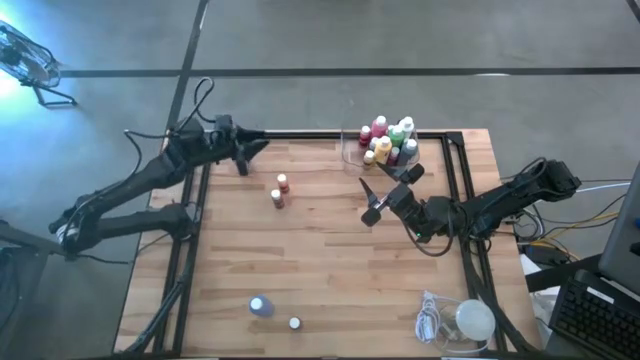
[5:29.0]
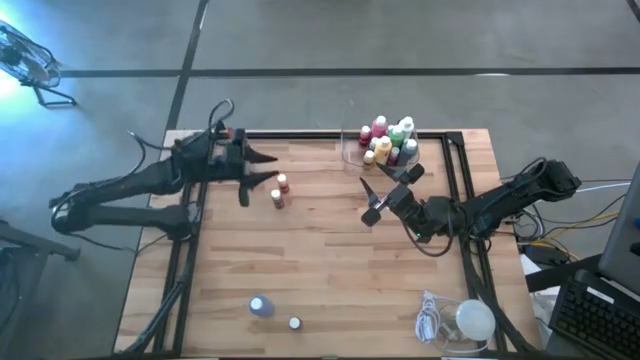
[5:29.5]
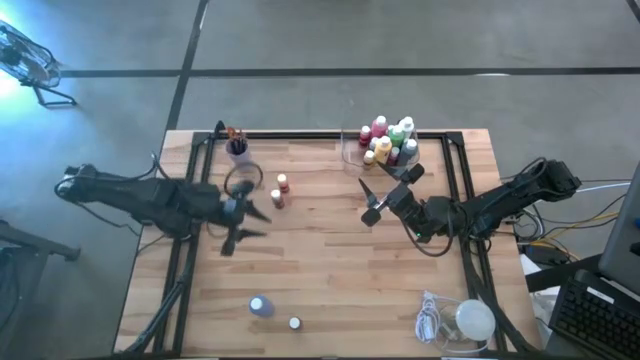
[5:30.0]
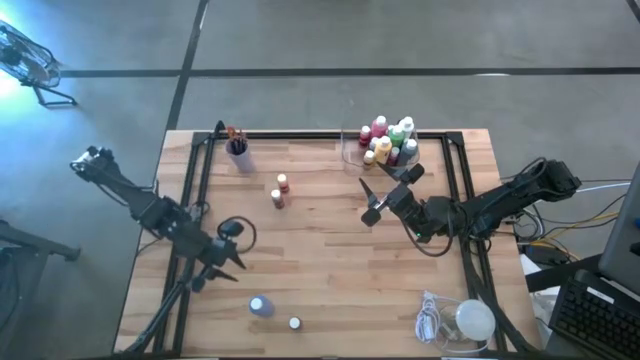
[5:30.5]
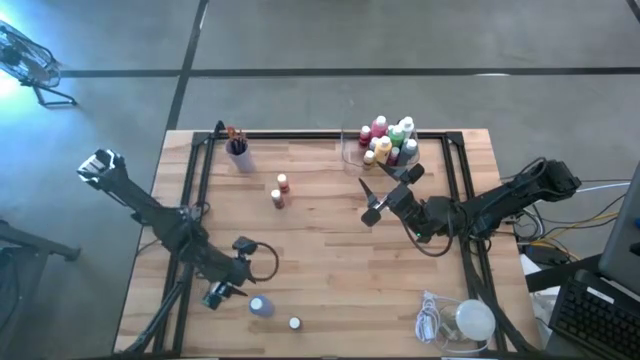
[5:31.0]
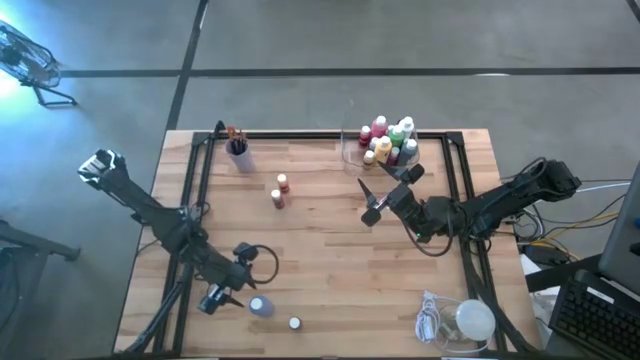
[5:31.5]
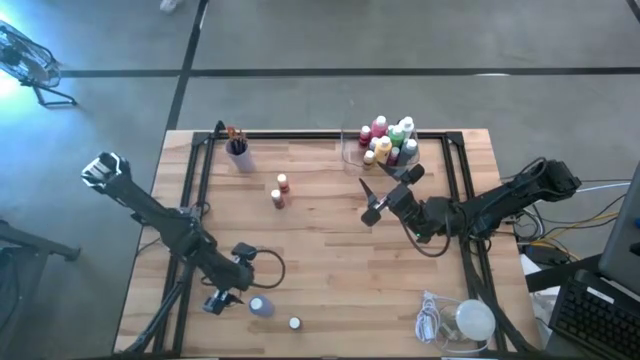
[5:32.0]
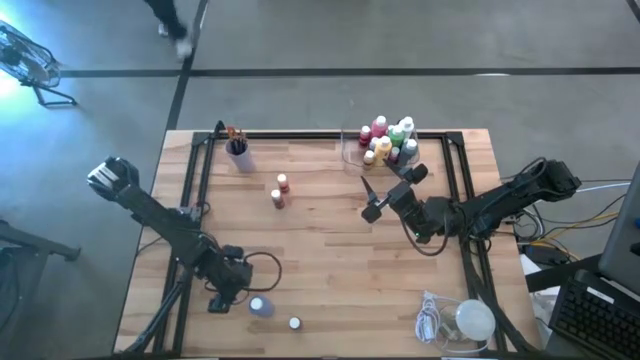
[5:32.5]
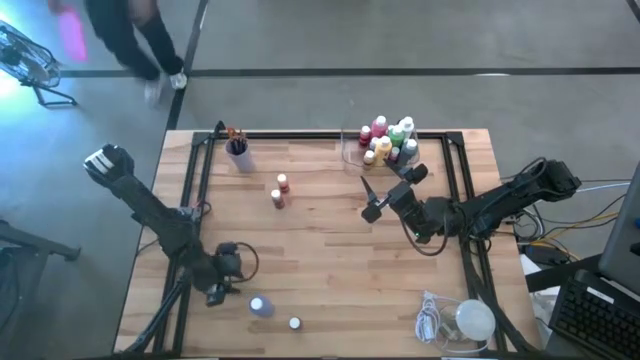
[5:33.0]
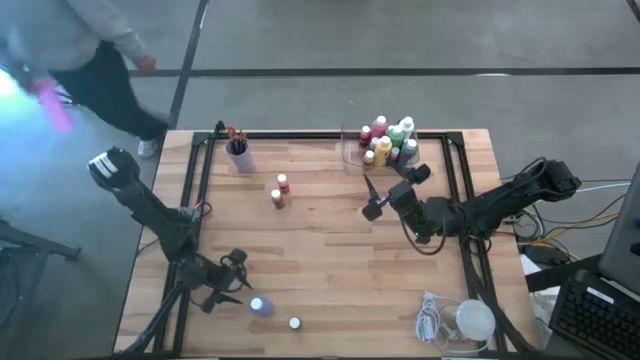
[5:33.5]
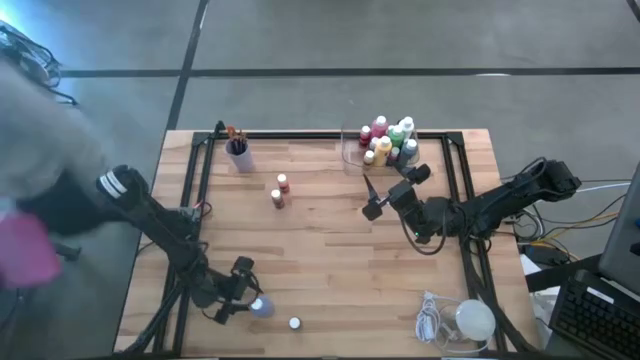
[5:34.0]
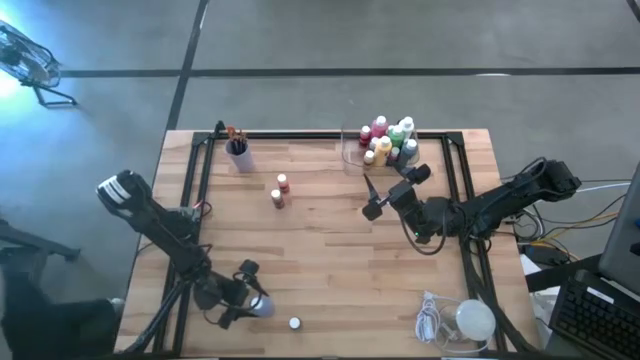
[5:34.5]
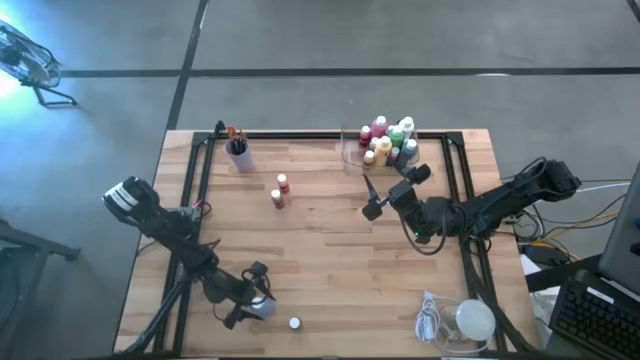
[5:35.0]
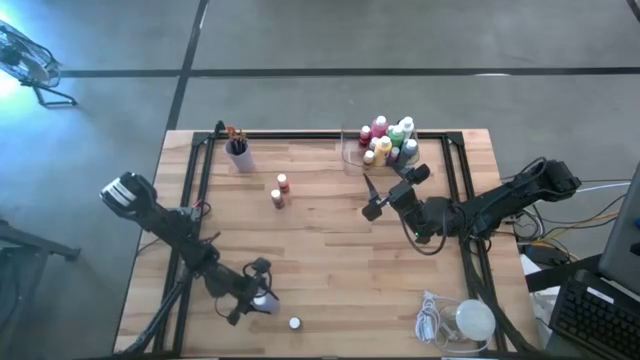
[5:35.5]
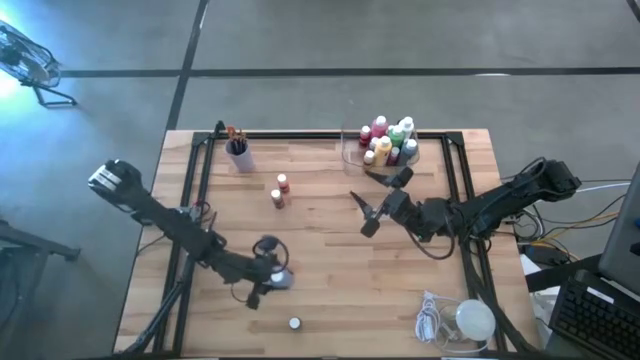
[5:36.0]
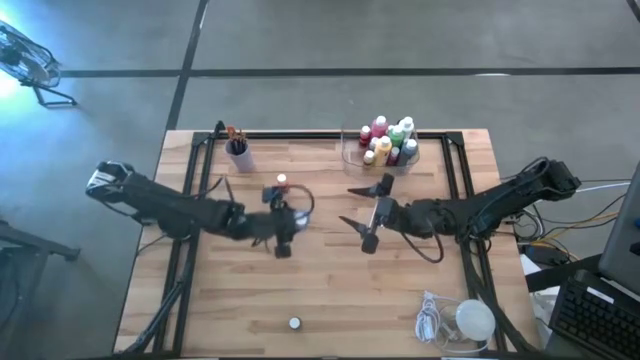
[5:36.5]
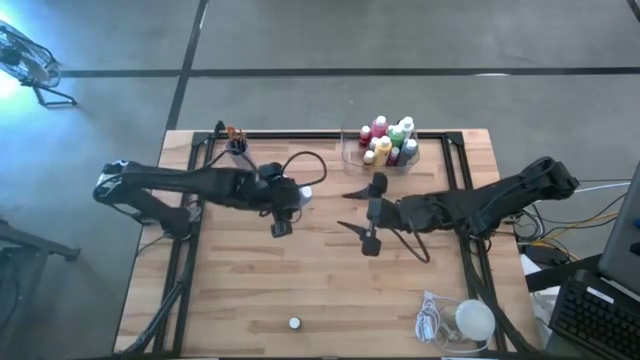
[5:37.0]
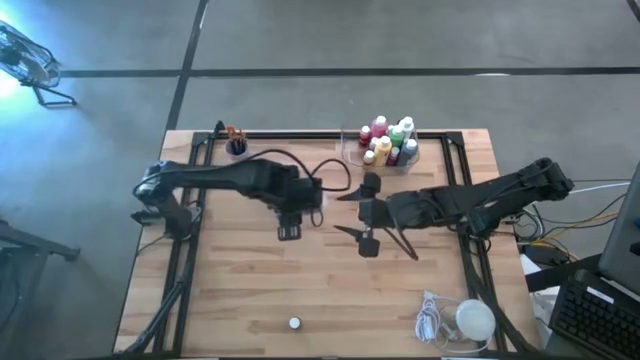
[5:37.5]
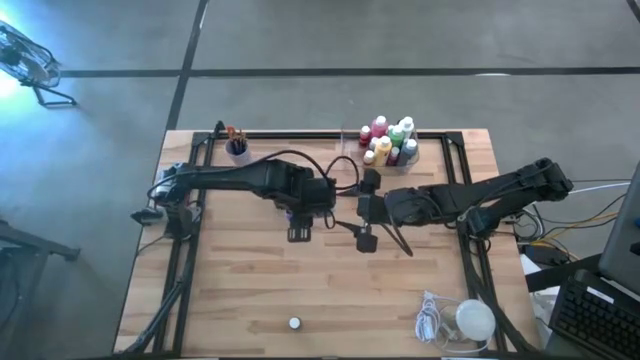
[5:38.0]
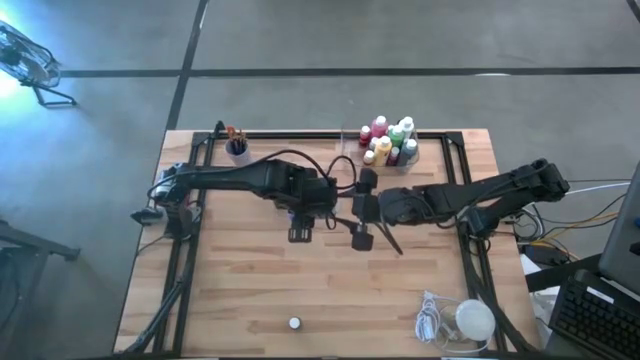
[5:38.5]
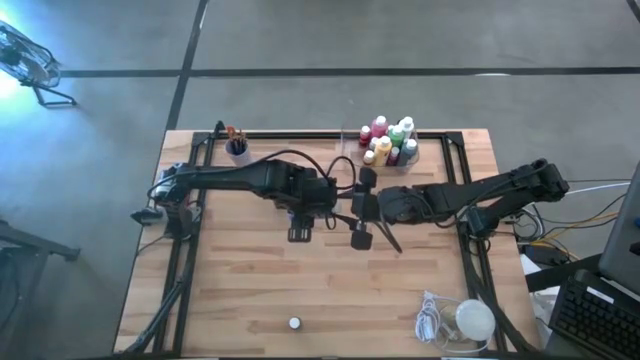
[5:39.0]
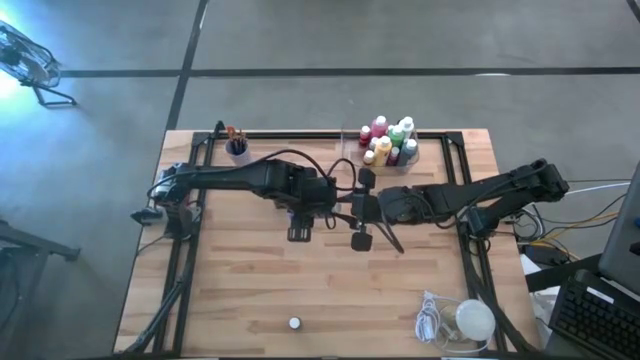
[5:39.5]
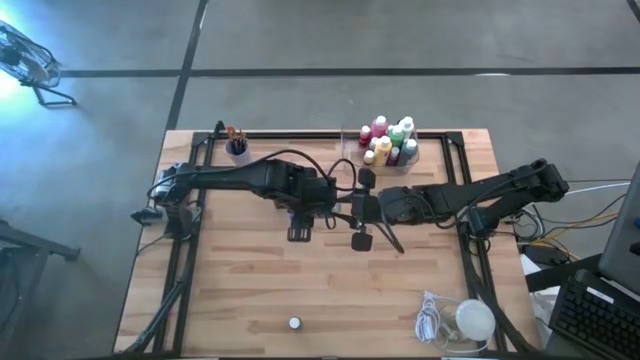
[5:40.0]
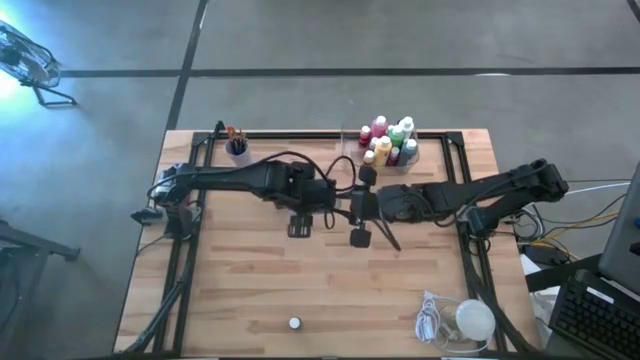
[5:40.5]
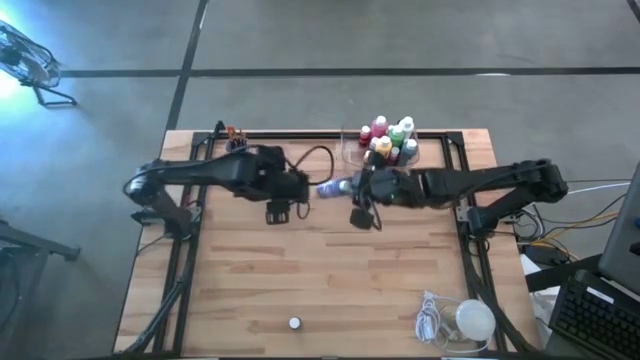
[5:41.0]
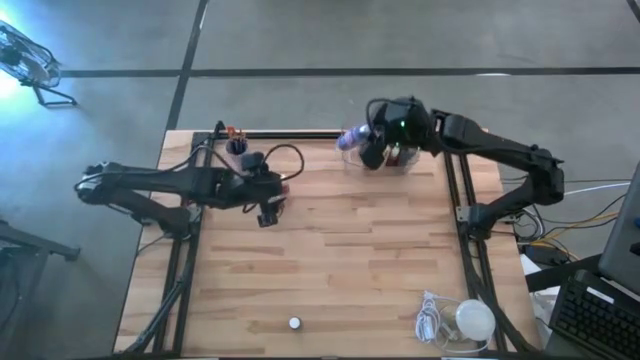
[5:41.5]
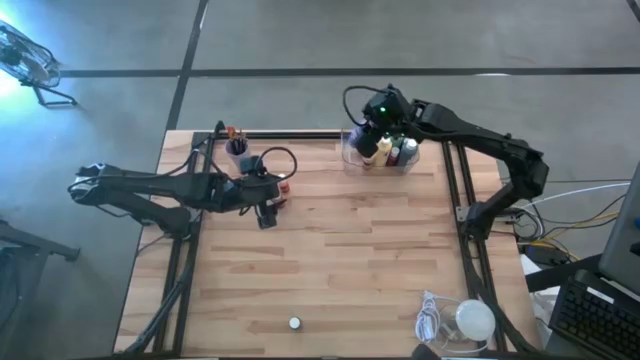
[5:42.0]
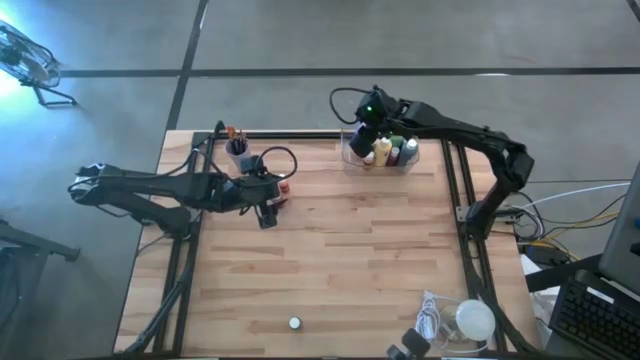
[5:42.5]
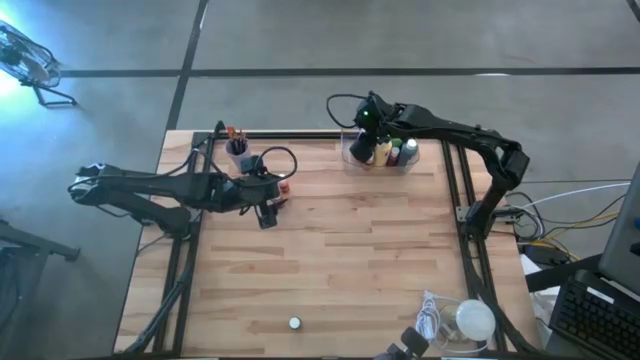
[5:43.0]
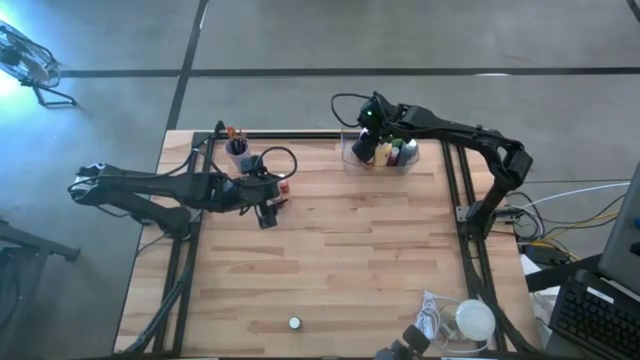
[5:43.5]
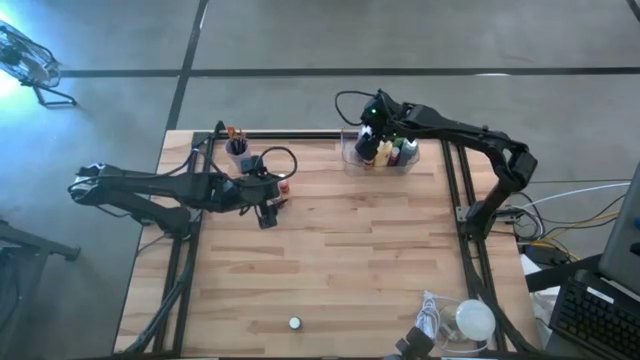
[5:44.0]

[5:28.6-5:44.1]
Task: Pick & Place Paint Supplies
Put the blue paint bottle into the transparent bin
